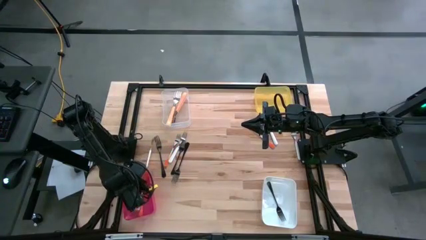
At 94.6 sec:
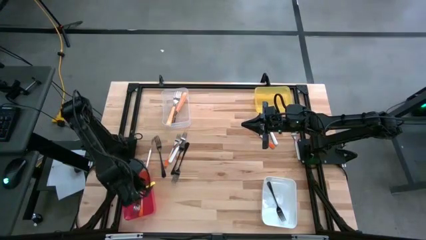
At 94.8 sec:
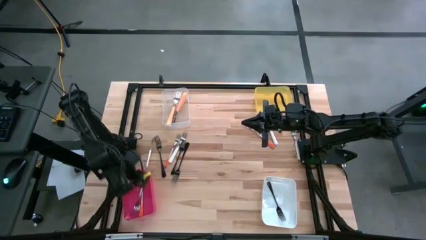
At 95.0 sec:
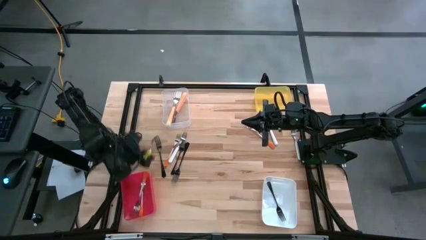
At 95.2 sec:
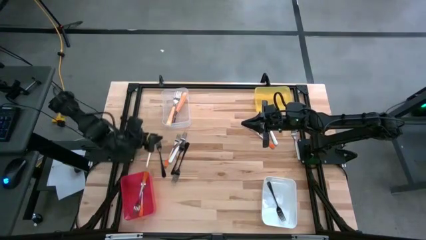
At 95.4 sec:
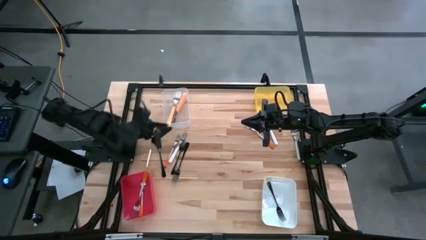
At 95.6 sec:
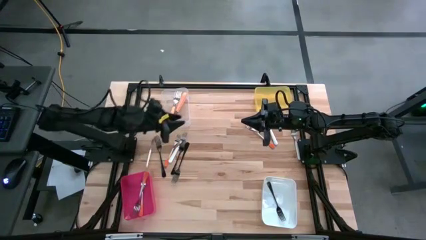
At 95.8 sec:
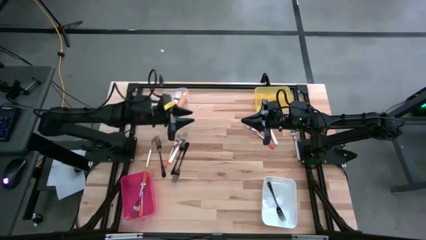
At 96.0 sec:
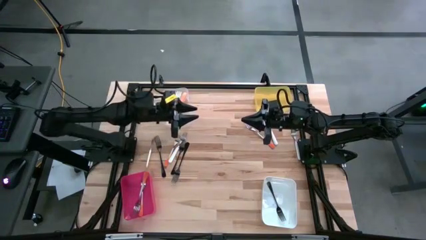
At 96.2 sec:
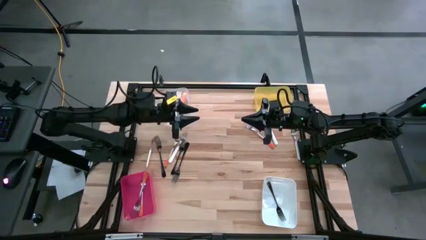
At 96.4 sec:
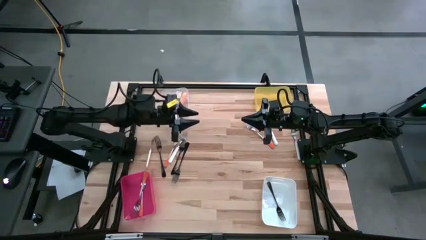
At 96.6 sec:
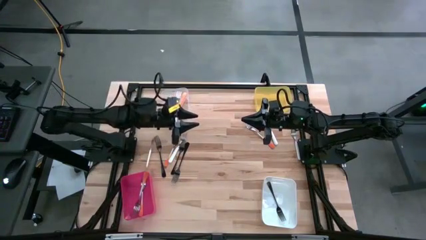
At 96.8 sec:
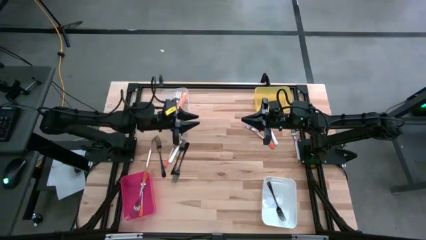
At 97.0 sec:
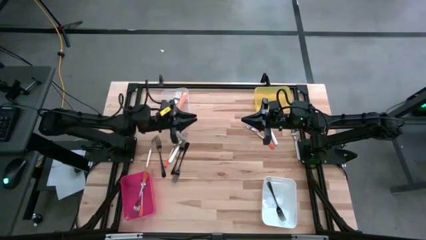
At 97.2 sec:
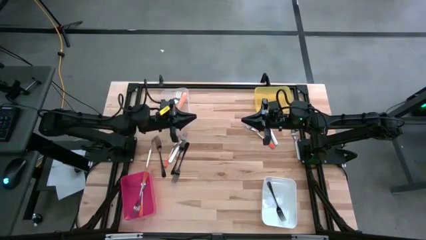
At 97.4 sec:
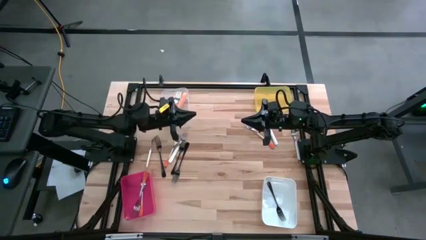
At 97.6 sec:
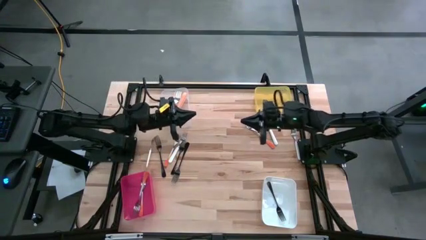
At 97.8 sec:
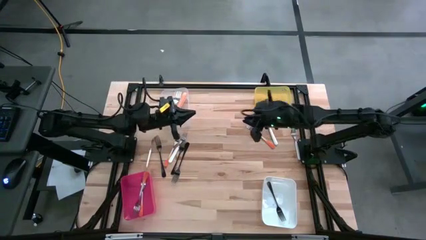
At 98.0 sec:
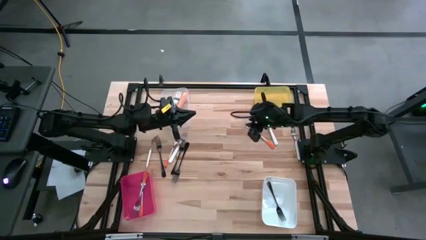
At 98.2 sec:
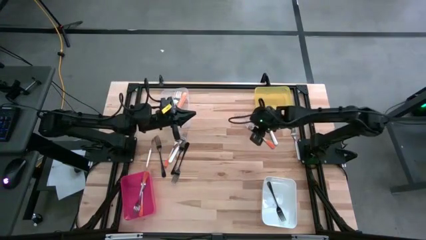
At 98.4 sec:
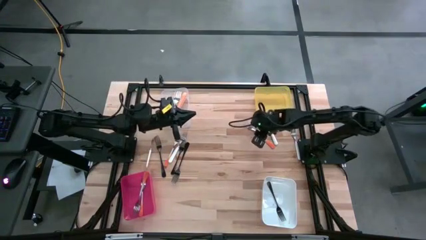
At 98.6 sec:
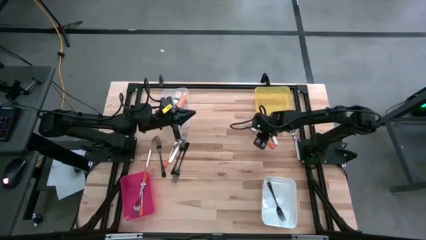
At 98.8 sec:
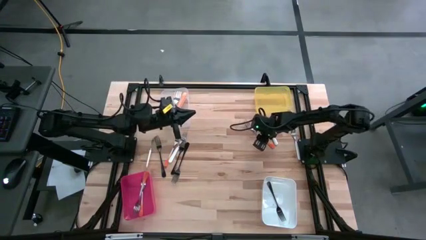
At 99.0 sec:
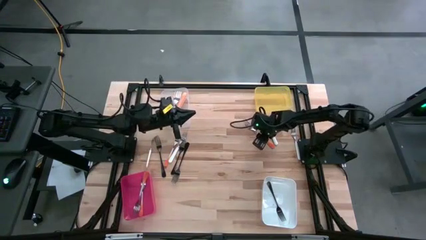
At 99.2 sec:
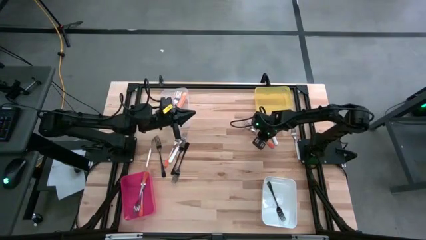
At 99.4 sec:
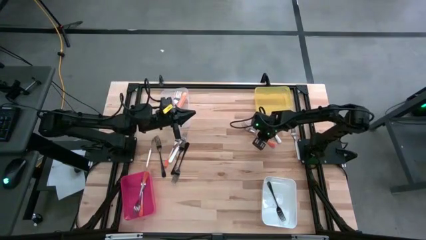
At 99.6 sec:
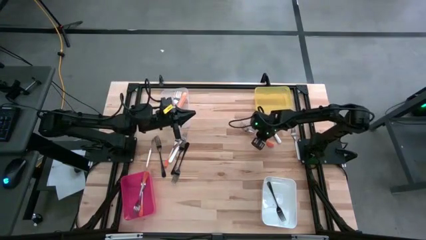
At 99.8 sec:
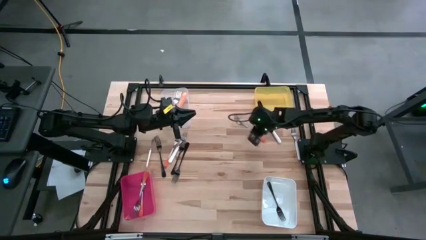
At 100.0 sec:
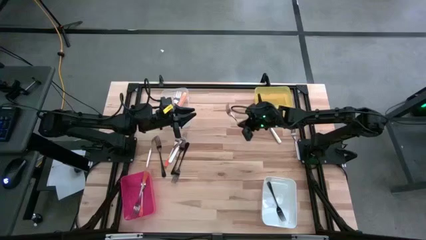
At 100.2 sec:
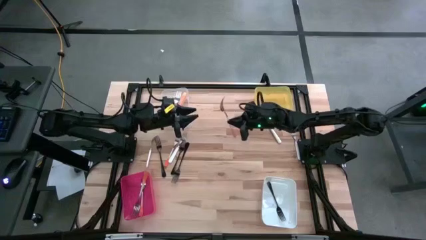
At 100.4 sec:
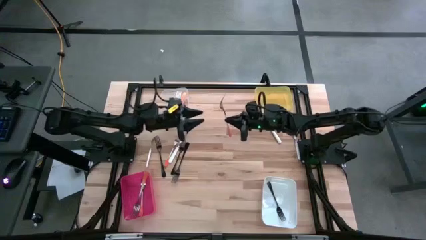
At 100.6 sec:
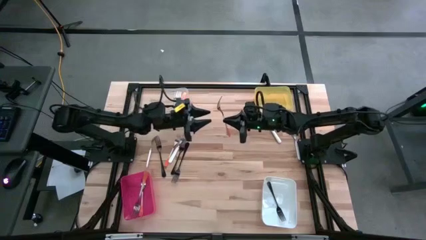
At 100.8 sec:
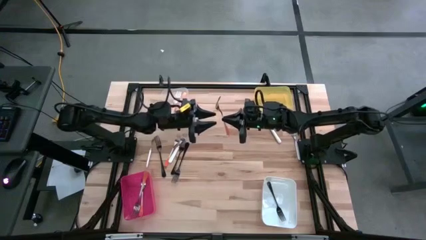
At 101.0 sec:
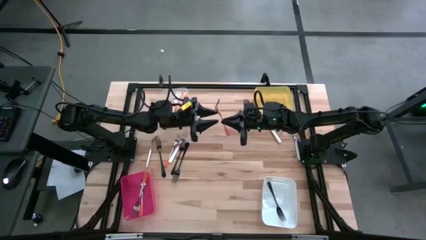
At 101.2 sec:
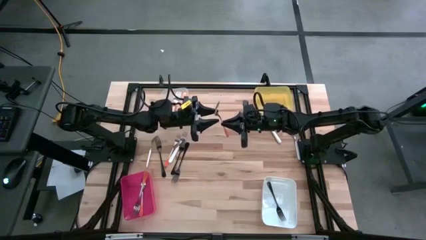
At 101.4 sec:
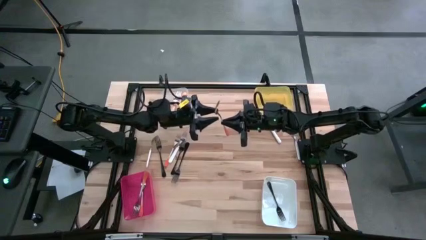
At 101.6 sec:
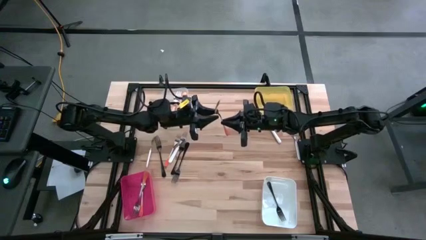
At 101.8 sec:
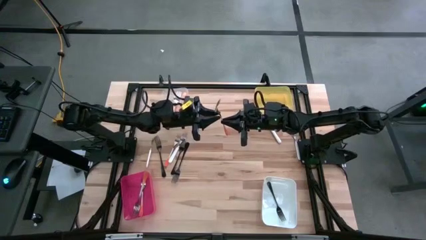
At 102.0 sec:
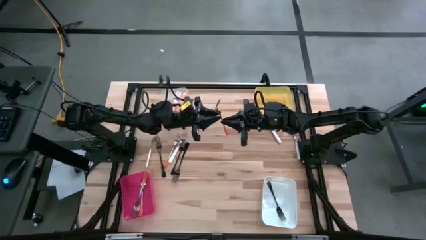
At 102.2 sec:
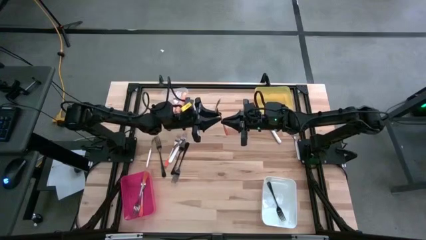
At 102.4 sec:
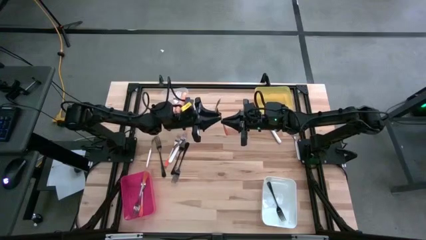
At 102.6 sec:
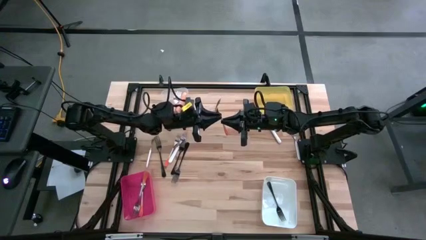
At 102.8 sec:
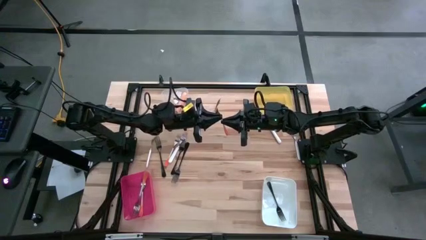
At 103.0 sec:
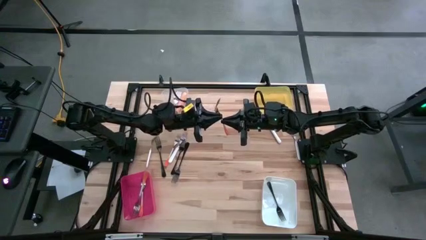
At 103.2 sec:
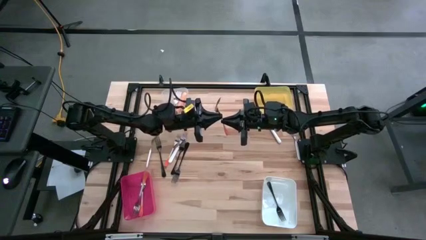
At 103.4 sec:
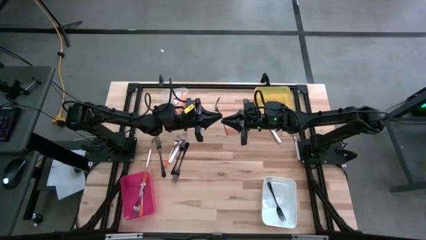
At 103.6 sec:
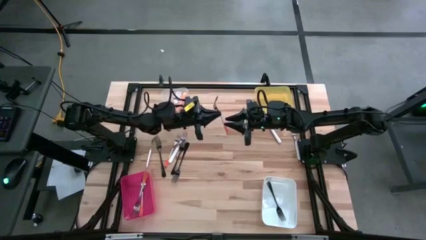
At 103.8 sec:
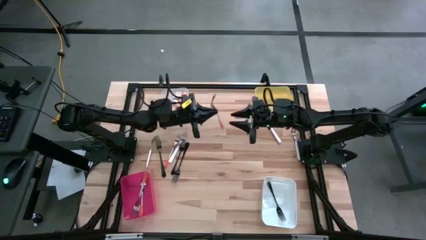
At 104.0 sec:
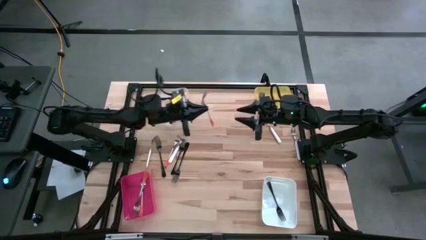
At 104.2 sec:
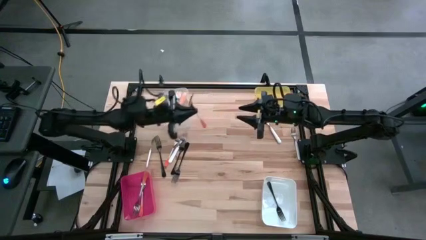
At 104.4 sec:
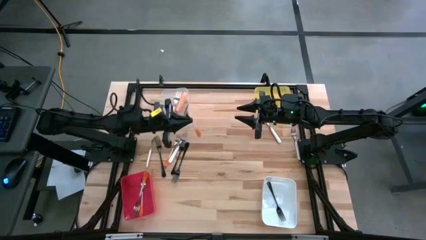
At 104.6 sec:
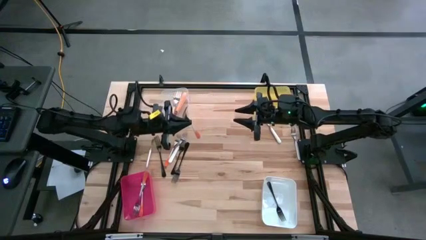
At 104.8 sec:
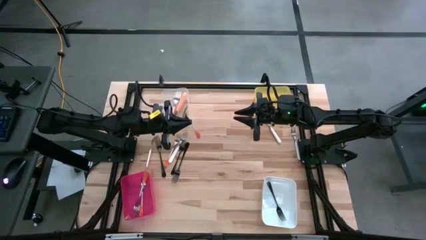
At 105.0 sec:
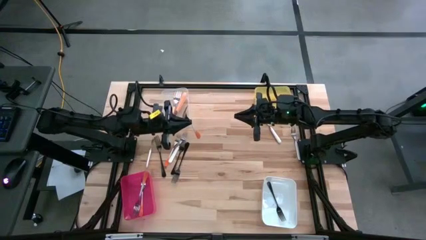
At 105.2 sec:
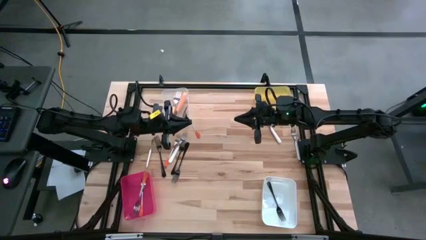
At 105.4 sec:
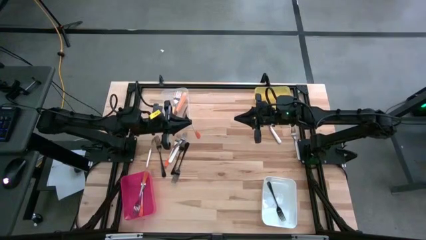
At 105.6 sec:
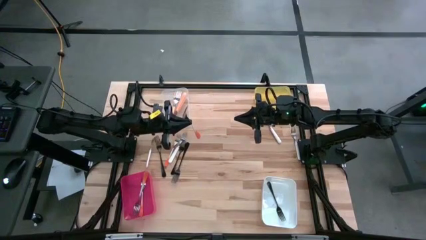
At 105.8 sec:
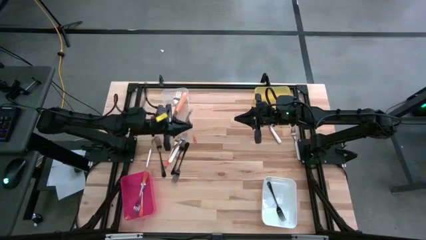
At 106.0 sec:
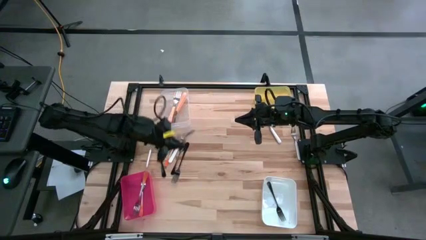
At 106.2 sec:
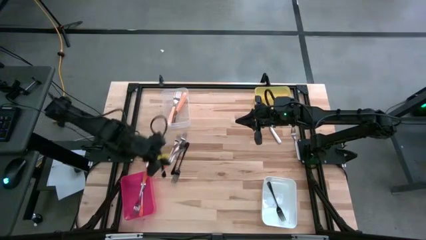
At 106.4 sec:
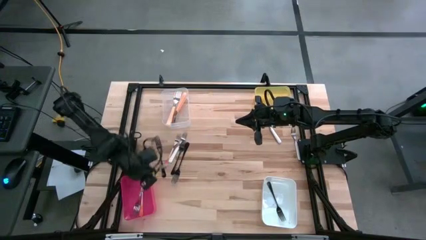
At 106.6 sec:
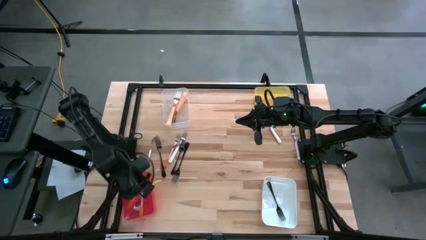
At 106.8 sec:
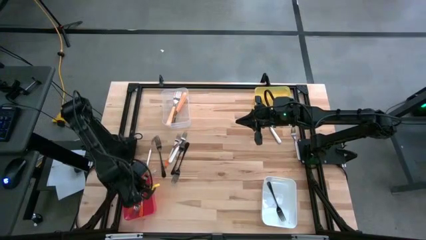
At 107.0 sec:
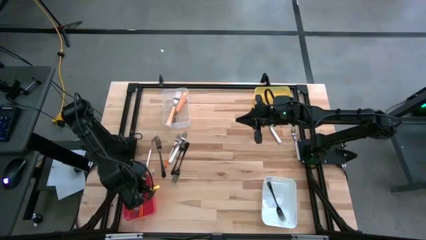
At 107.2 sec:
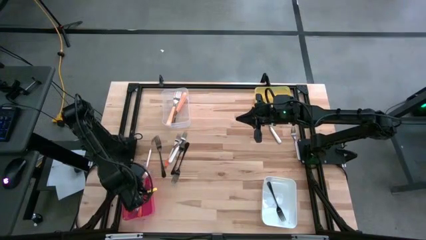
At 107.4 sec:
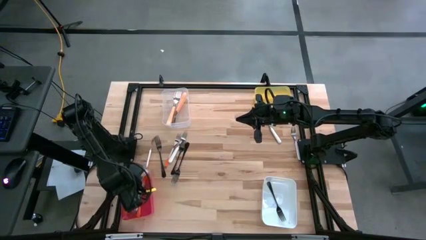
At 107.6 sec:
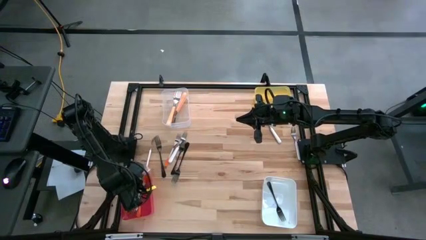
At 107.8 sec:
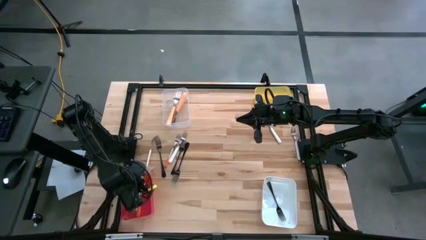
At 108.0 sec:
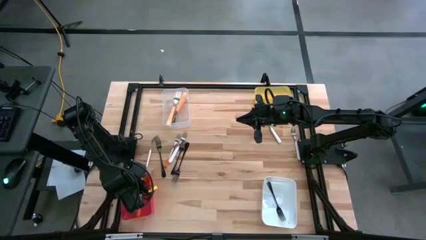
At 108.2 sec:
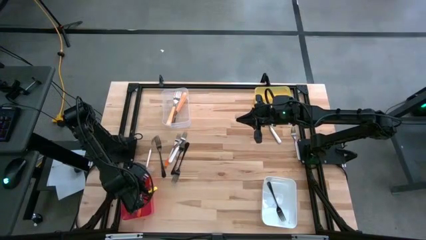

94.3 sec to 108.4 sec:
Task: Sort silverware by color (type)
Put the orange-white fork into the red bin

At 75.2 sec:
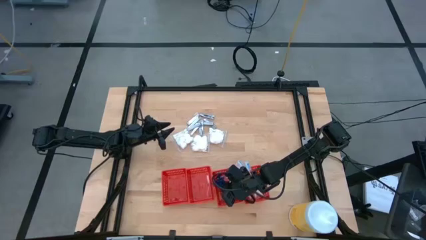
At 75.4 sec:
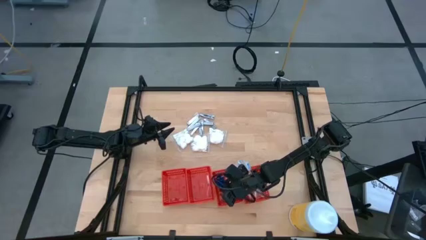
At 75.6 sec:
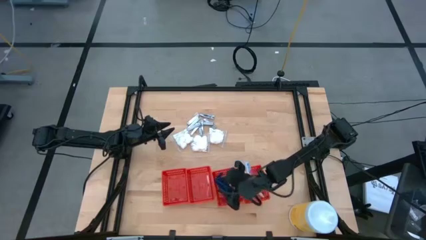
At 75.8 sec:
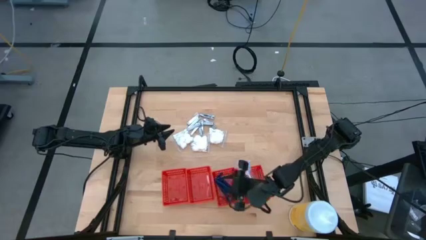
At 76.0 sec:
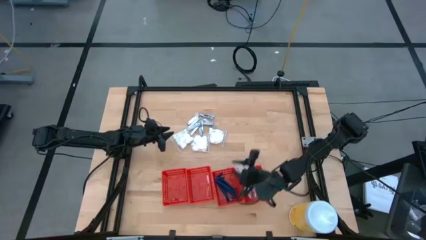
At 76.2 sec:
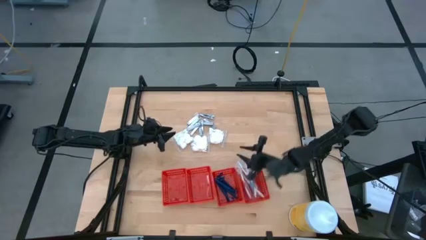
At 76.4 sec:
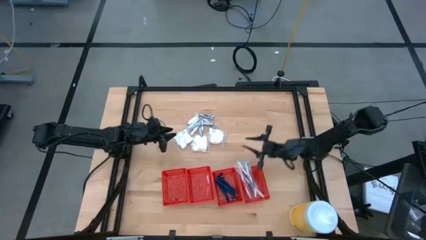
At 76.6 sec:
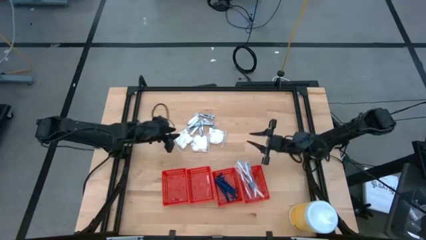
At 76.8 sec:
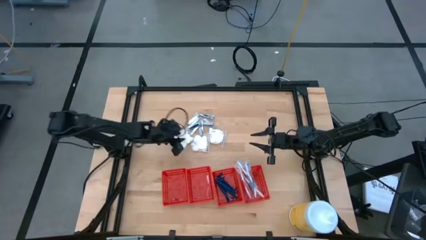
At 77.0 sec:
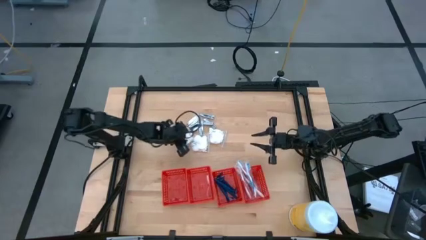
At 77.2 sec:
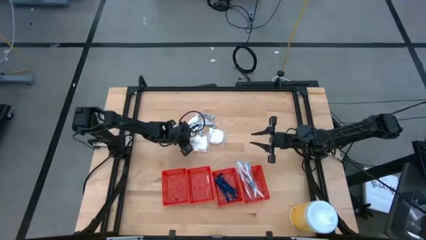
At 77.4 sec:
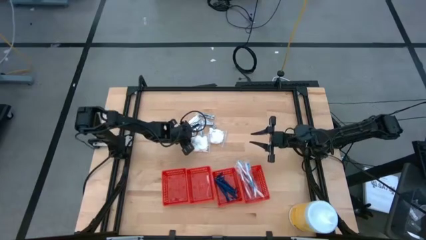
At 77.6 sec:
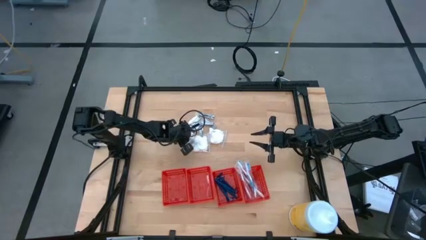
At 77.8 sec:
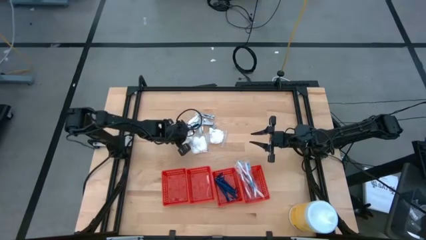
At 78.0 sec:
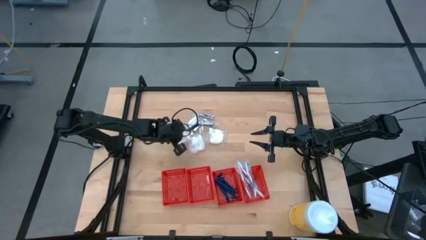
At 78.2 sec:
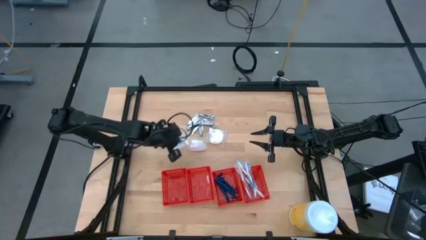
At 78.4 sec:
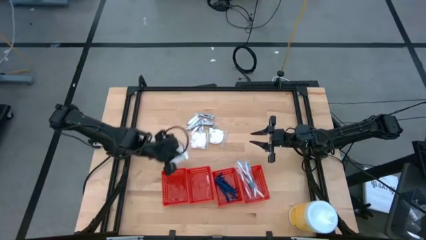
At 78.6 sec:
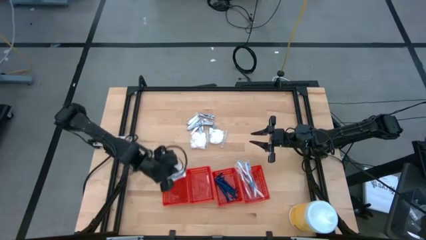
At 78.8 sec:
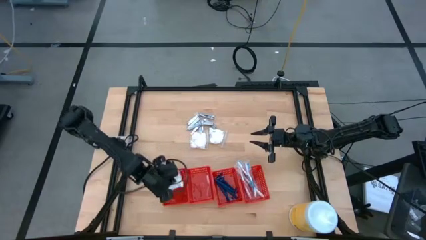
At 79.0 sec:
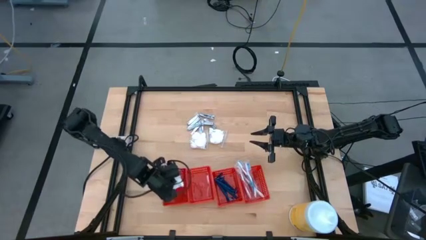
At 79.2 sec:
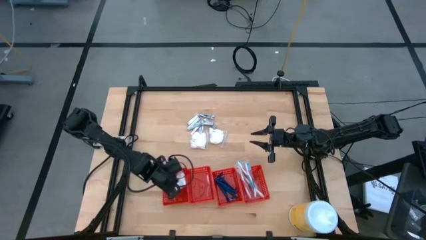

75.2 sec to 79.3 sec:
Task: Pick & Place Travel size toiletries
Put the white cotton packs into the left red bin
